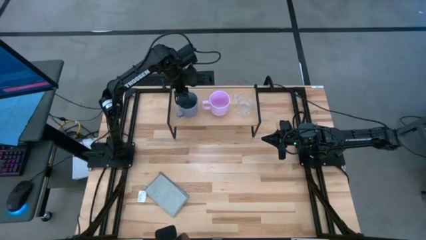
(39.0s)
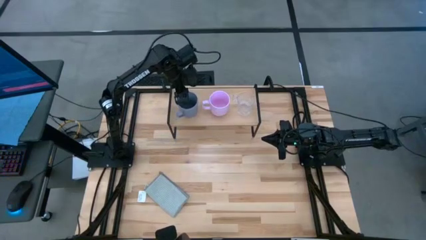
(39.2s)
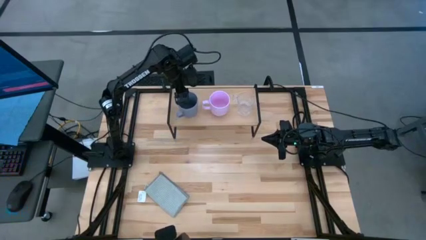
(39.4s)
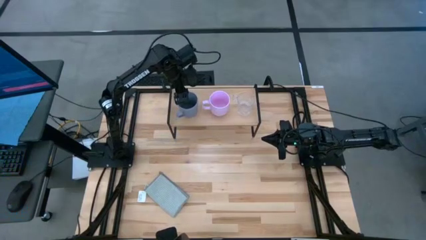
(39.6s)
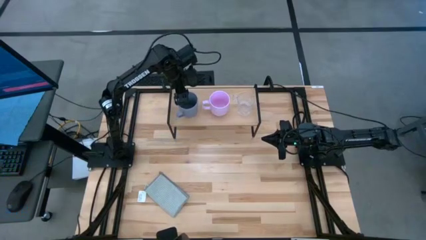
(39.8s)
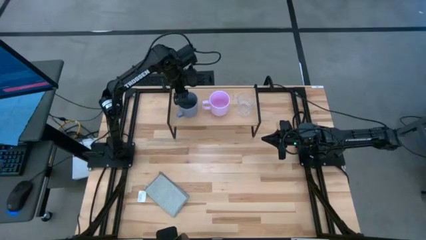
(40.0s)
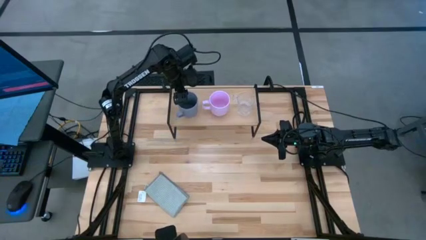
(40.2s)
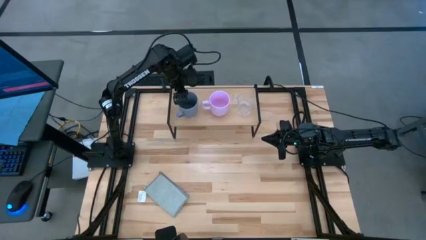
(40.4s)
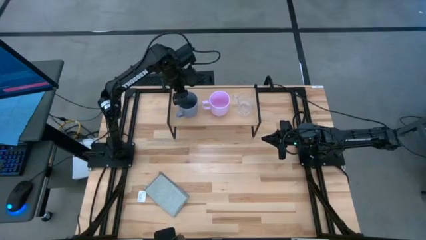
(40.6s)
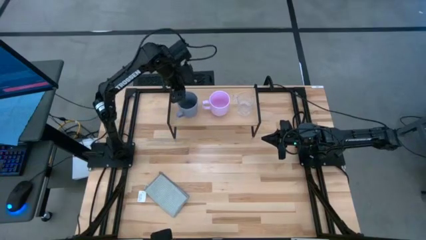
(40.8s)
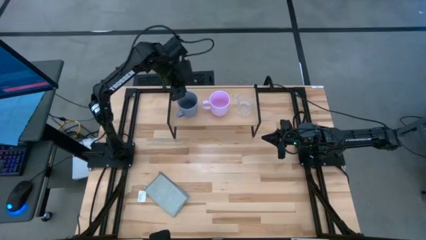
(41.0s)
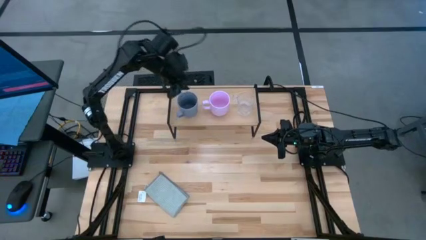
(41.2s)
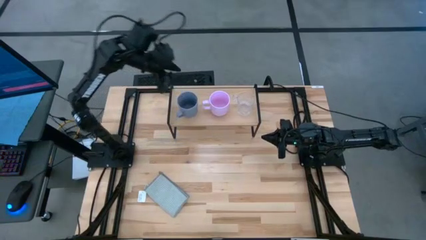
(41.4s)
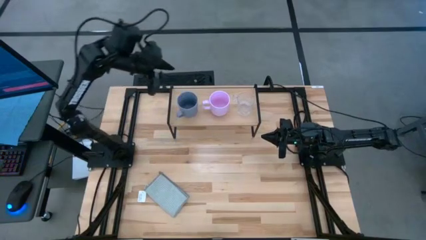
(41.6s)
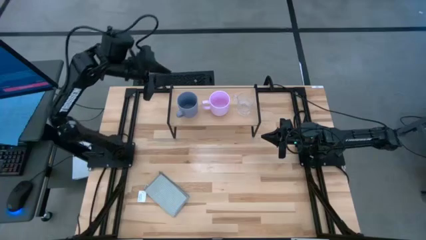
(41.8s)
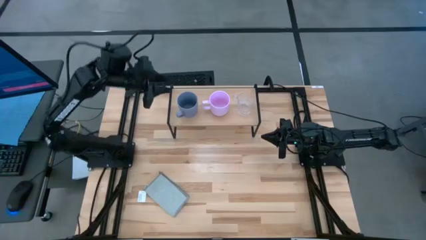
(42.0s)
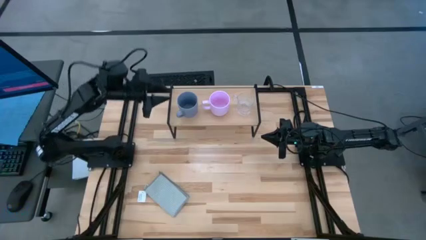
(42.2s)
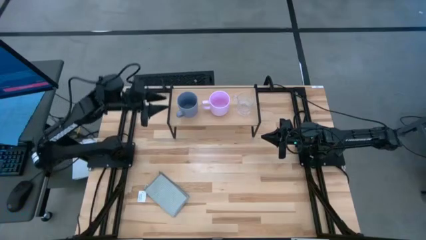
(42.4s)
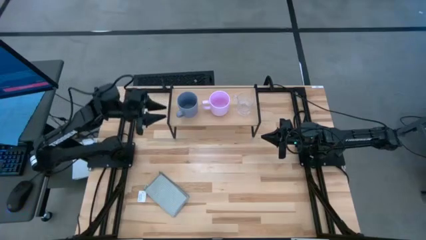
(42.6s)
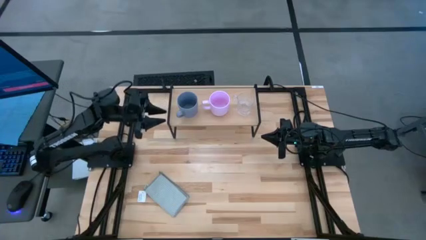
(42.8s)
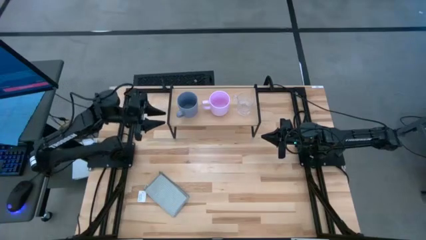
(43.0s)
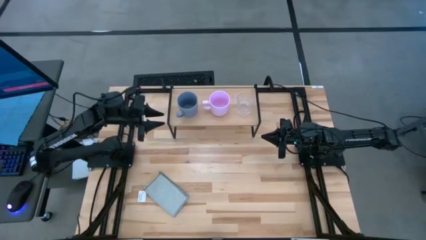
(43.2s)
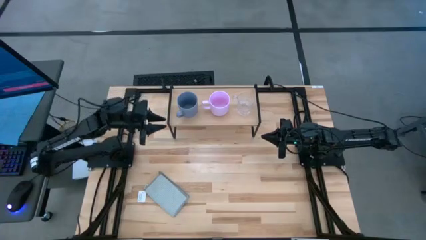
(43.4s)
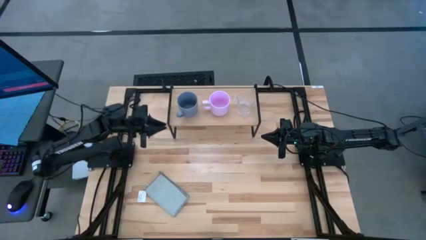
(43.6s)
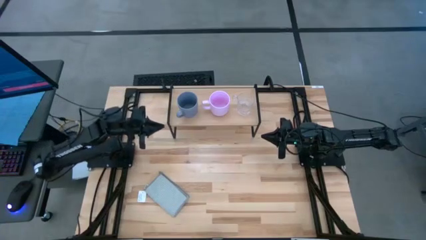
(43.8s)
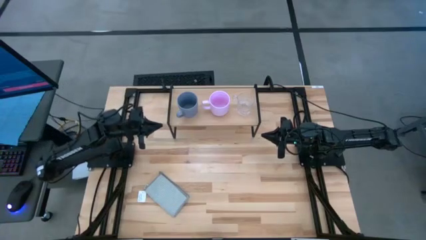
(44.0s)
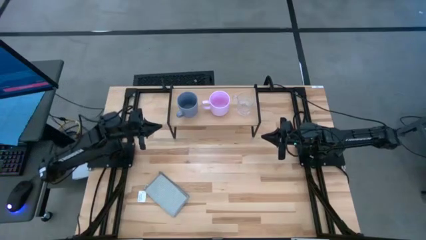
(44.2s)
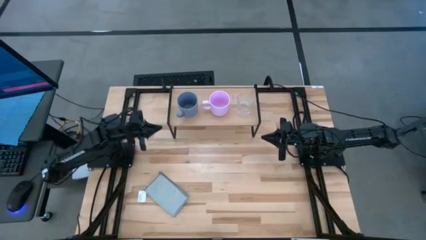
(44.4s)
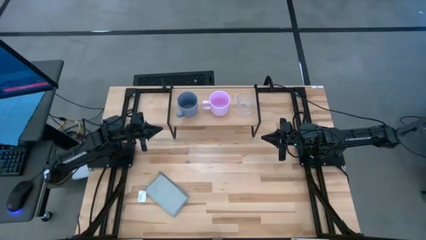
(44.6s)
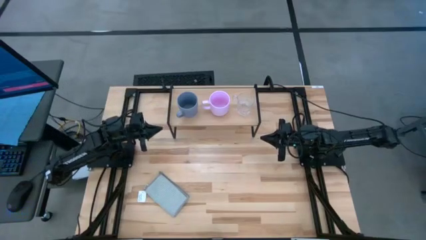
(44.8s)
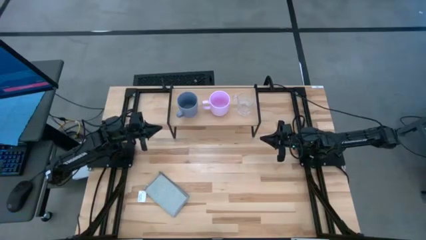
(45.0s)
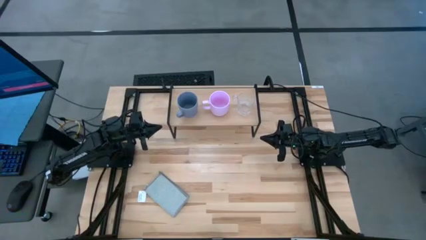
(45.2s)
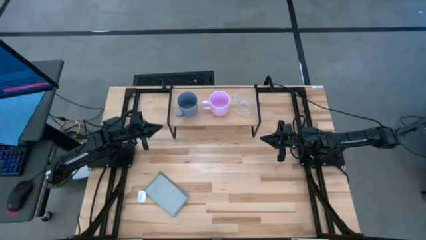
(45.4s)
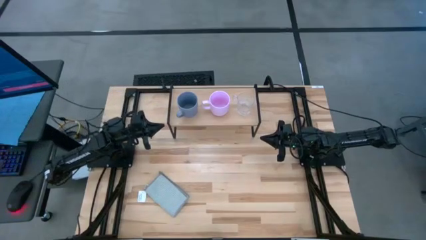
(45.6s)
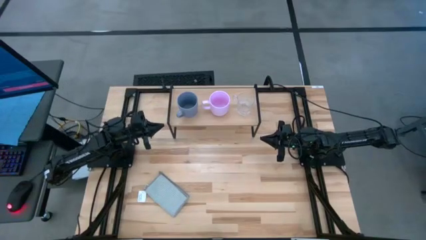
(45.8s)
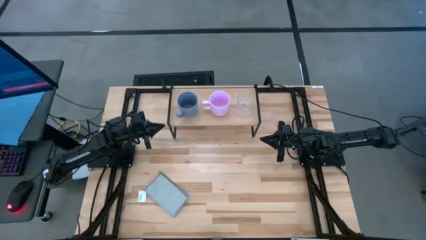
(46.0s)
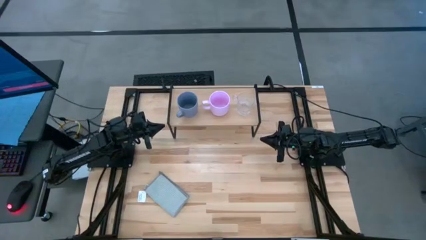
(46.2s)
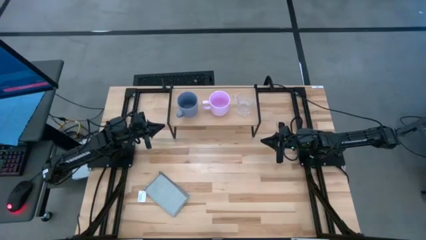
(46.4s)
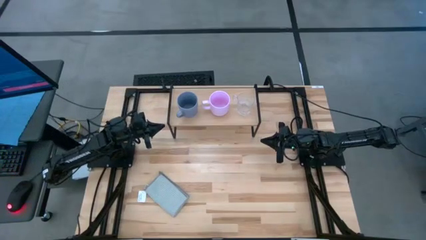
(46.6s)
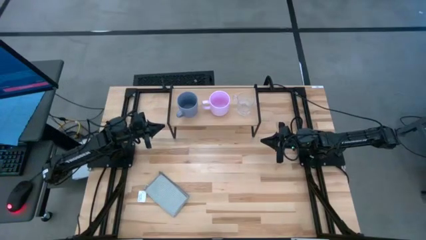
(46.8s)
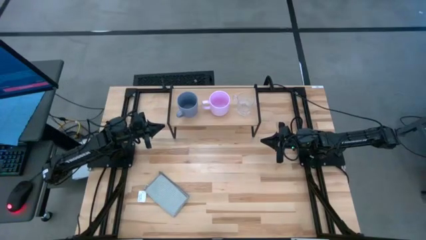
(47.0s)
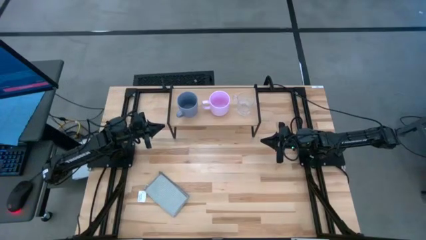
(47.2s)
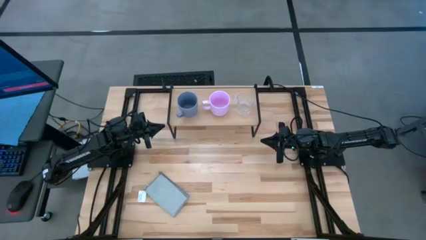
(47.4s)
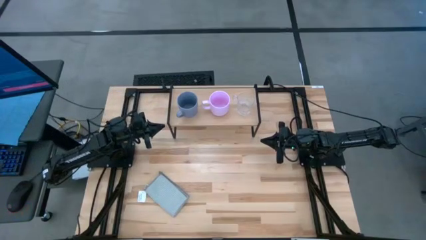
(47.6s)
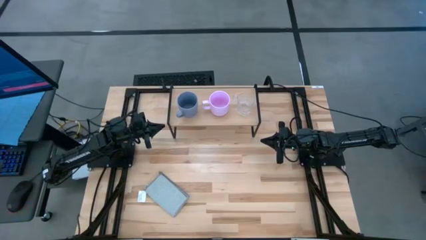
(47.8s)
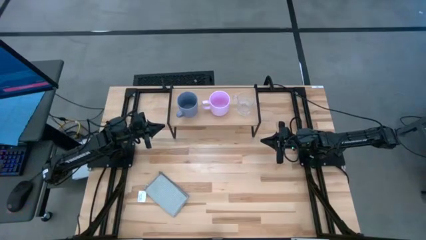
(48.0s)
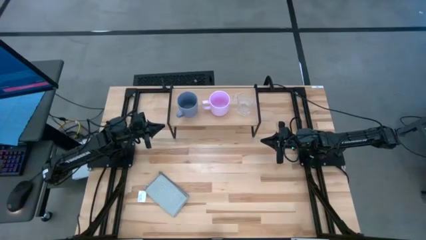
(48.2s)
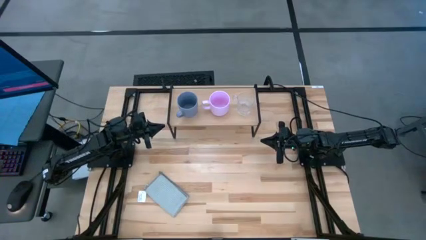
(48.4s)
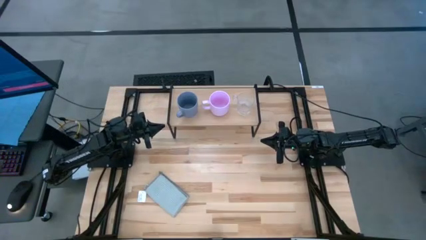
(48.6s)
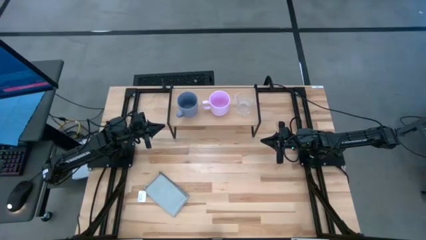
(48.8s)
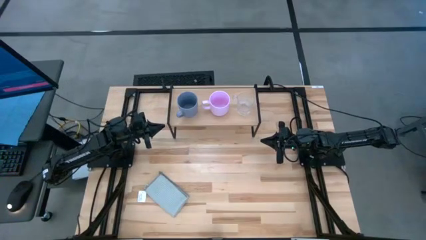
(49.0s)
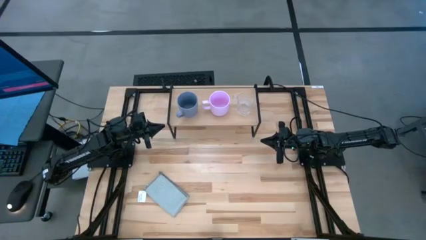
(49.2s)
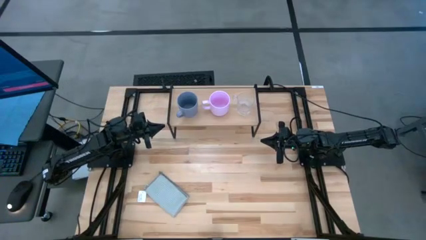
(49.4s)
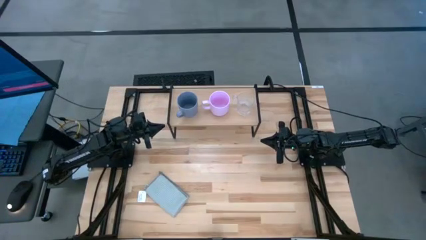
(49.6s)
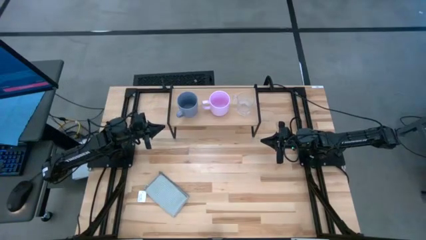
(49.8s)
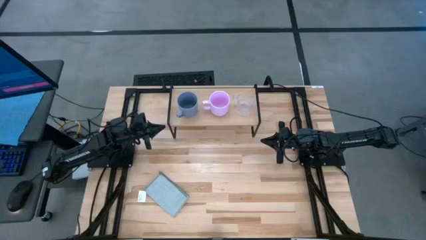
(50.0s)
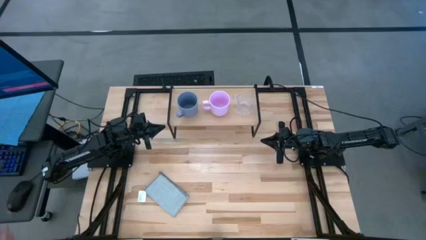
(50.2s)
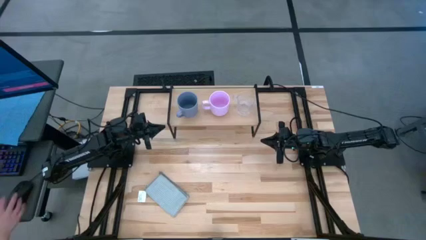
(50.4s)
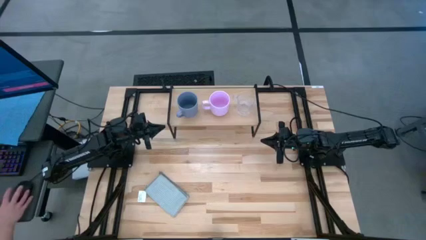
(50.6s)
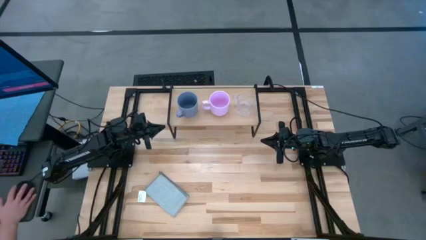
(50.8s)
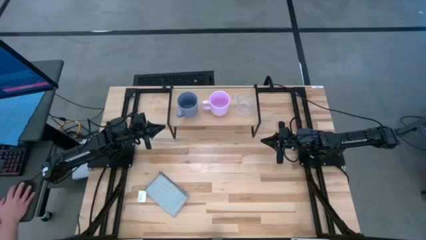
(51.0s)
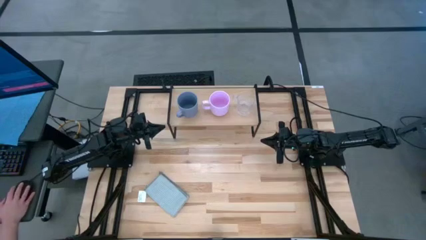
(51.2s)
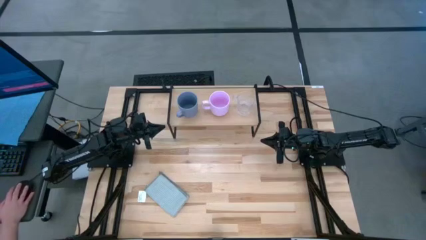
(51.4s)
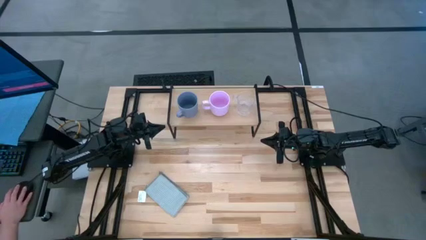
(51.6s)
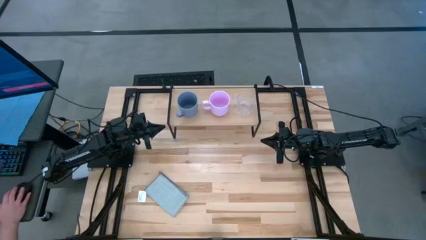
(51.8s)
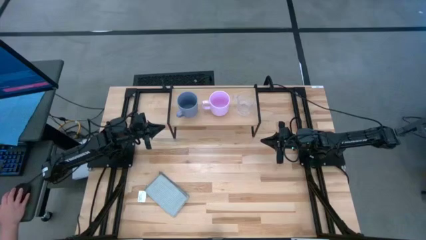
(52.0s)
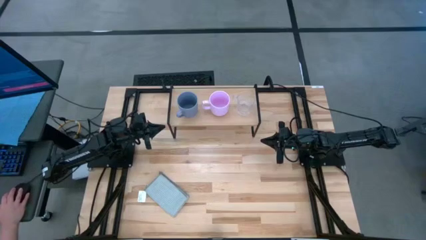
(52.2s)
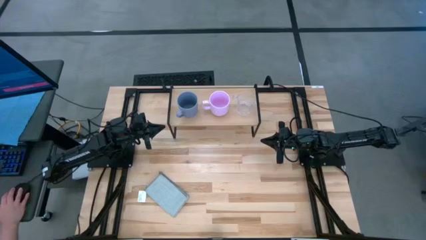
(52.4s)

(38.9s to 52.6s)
Task: Stack small to large cups/mugs on shelf
Return to Home Position

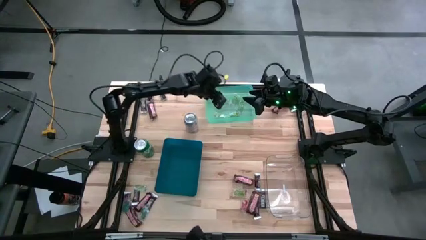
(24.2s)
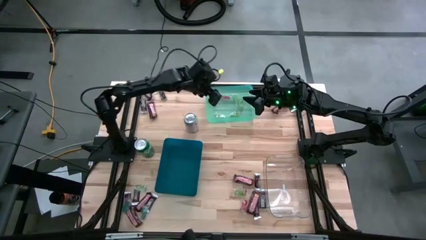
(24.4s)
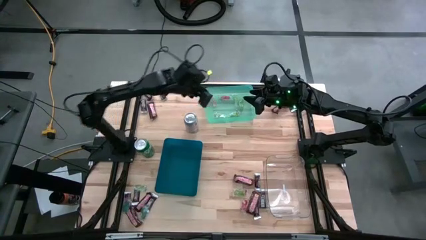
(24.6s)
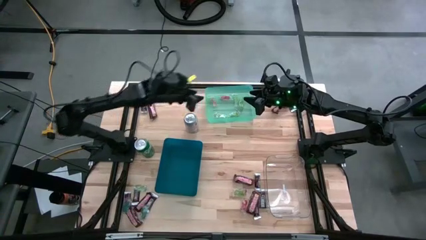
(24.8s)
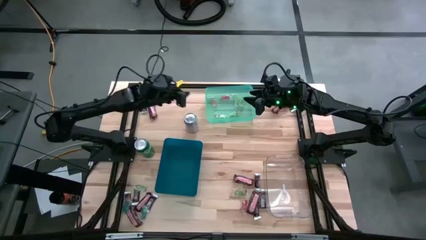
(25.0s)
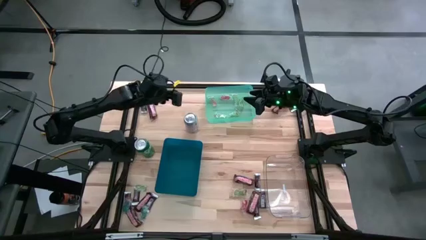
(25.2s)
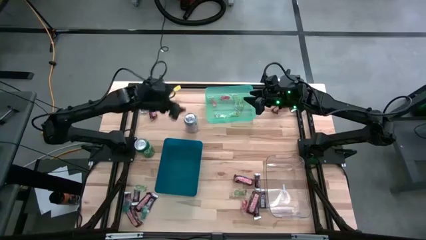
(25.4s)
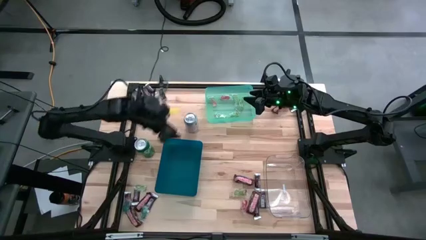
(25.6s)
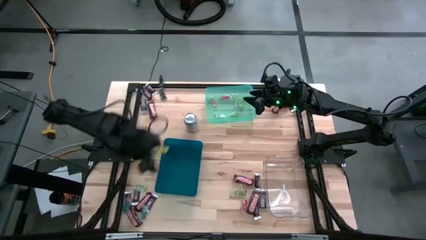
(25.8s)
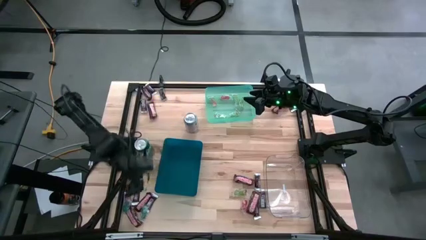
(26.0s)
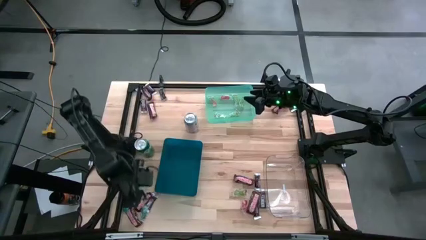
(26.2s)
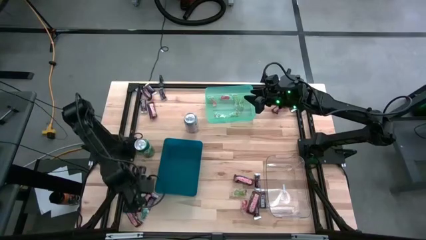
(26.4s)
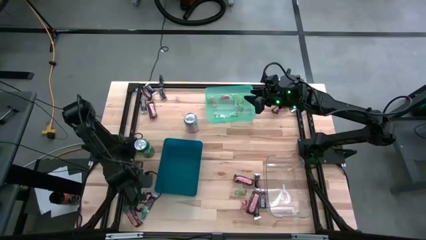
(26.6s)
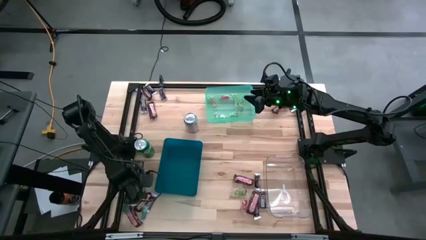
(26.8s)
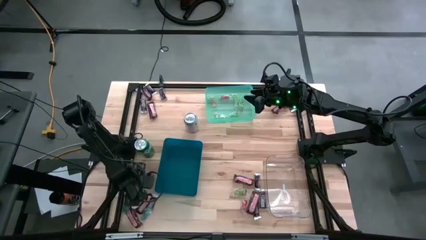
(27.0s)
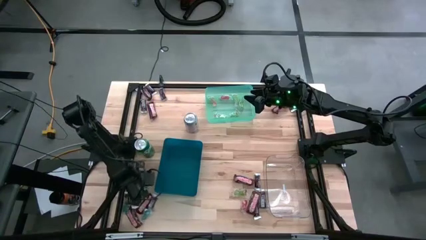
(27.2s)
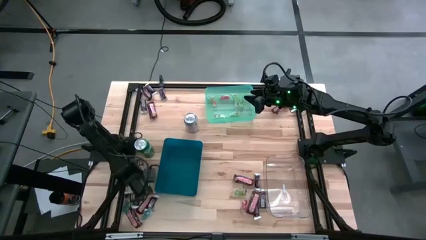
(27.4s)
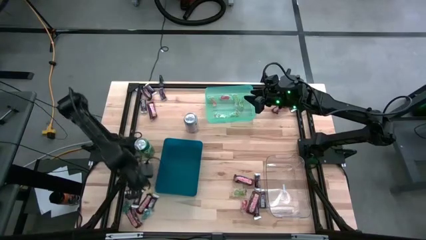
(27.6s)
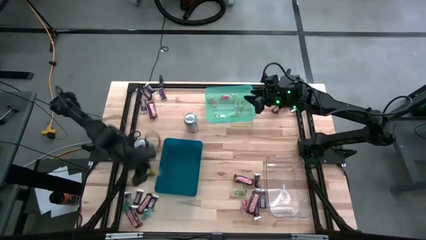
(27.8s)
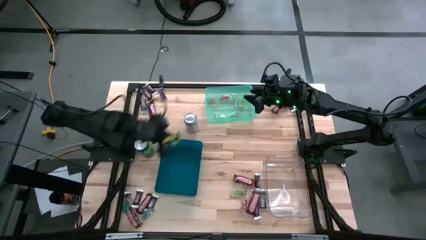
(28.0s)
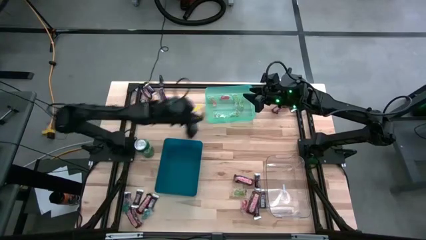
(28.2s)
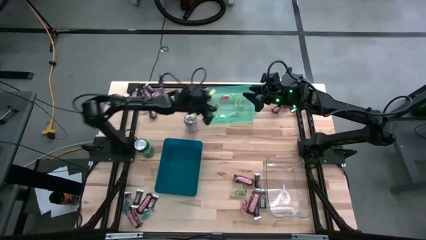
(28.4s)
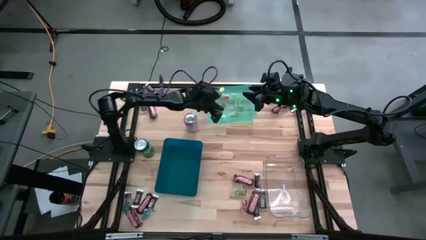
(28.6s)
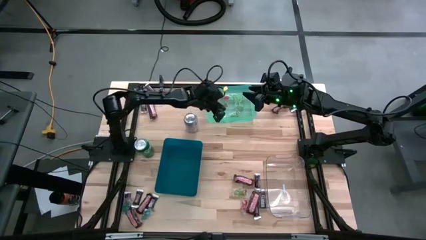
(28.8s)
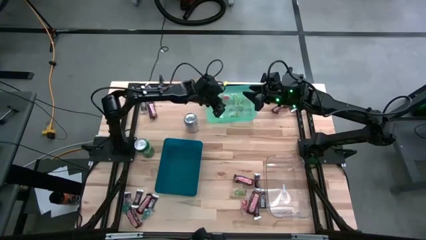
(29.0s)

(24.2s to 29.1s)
Task: Organize candy in baskets
Put the transparent gummy into the green bin
